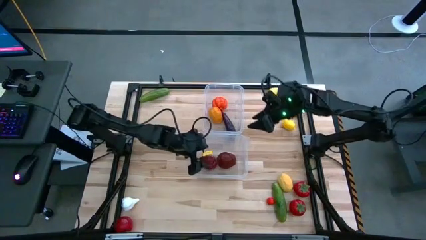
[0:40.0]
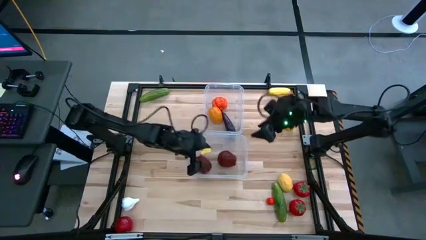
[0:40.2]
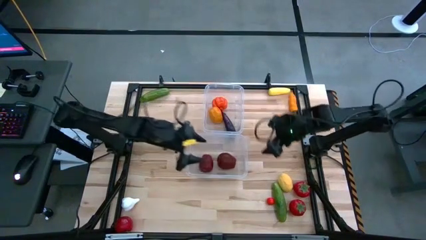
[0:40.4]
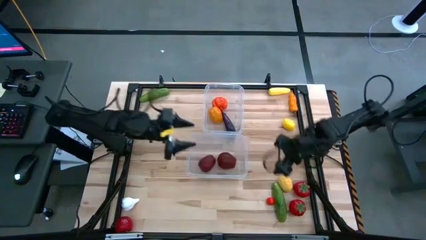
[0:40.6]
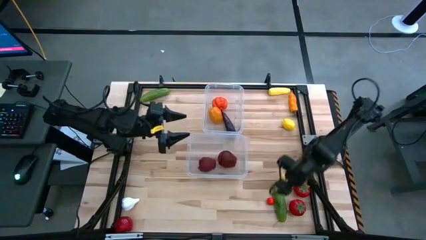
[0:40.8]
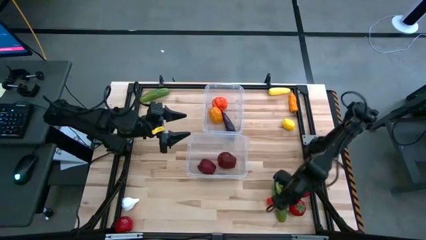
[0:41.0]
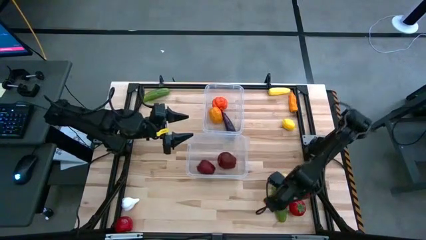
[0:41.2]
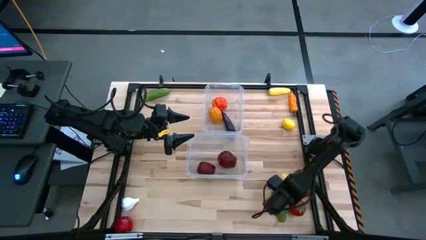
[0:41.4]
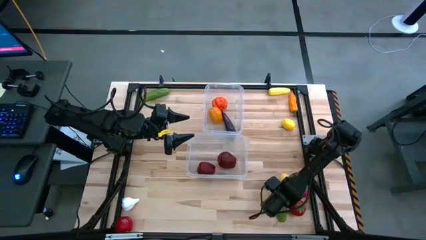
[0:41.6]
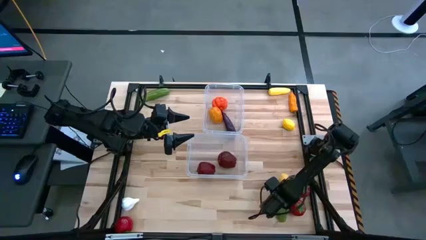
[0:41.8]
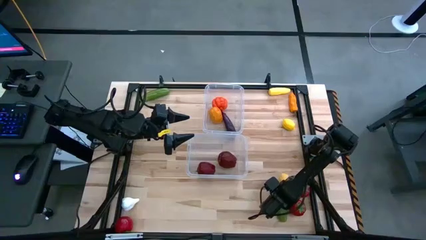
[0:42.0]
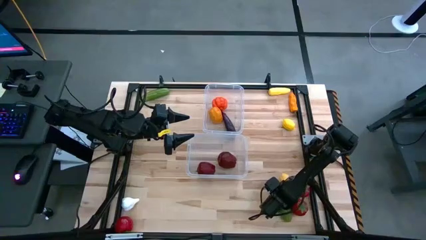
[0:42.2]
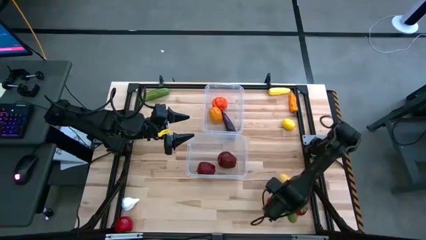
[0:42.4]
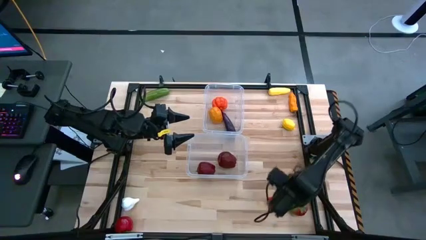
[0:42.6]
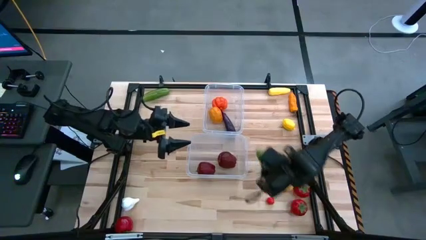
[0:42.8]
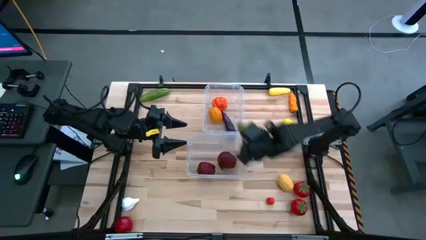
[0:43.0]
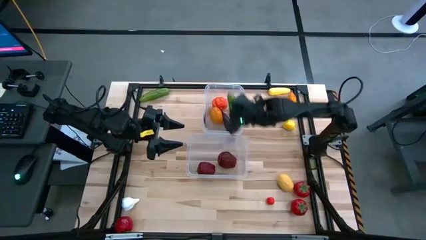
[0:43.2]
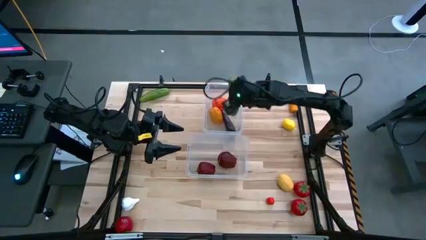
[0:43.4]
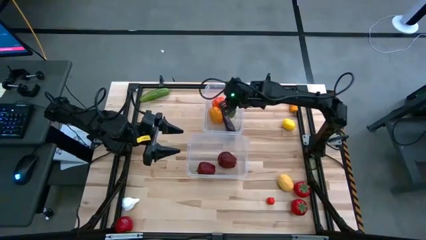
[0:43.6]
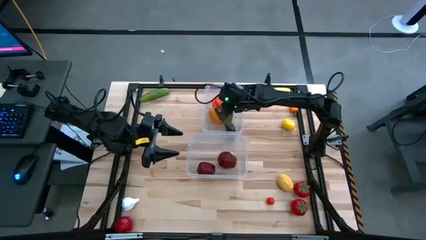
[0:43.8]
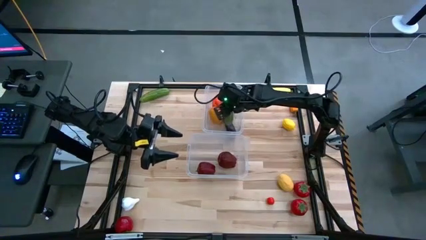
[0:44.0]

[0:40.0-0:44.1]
Task: Sort produce into baskets
Put the green cucumber into the top transparent bin

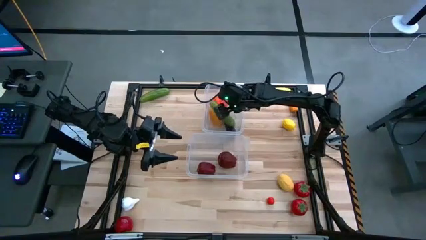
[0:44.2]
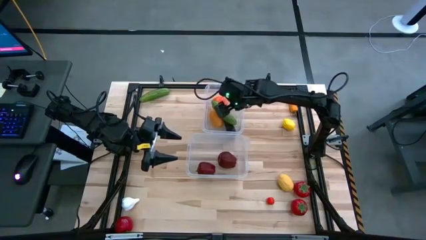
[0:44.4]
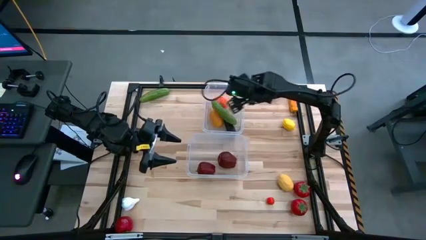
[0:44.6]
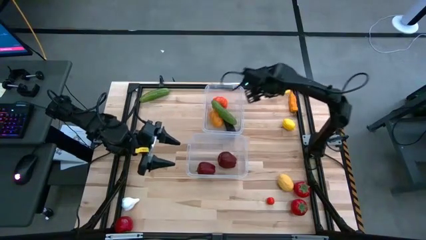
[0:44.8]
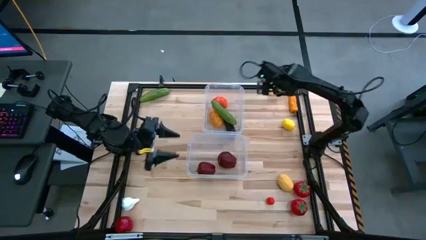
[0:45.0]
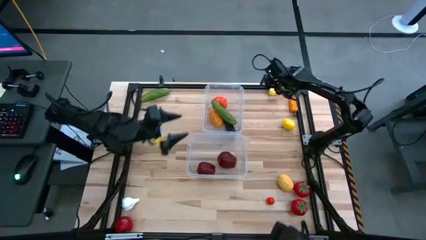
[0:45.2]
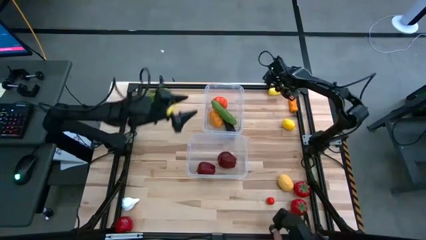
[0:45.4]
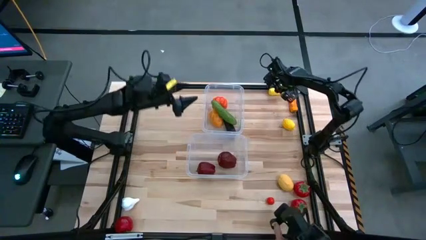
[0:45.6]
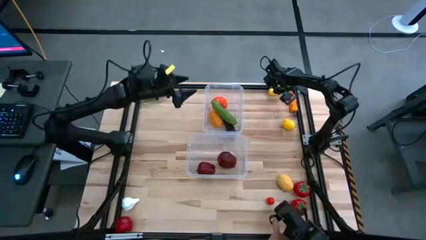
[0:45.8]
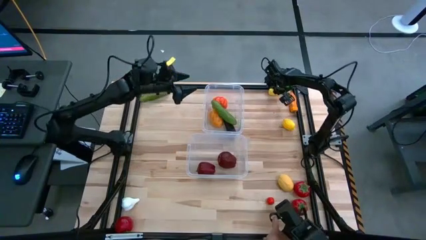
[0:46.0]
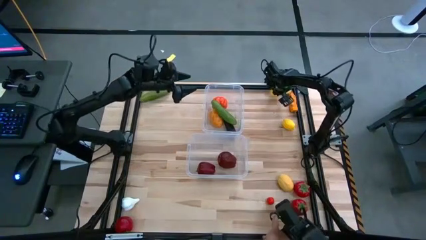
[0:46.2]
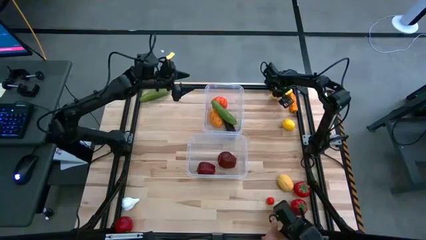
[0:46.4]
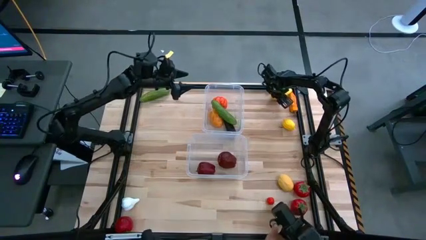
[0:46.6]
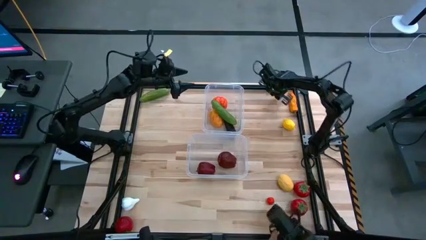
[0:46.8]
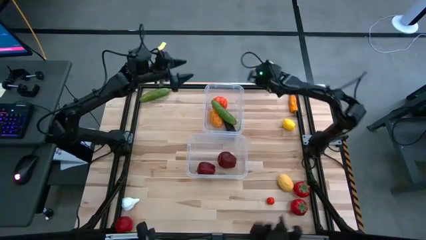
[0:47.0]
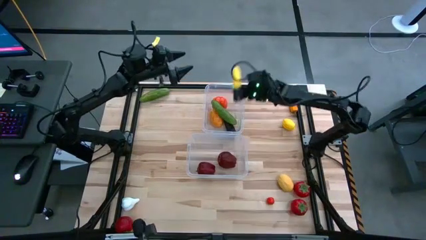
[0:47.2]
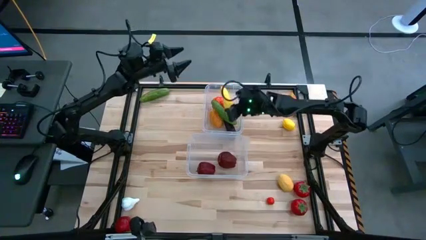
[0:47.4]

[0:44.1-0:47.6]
Put the yellow corn into the top transparent bin

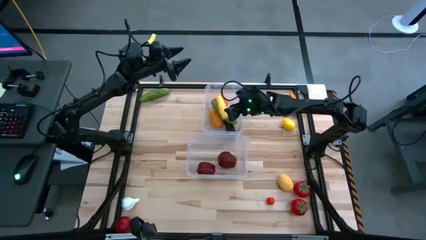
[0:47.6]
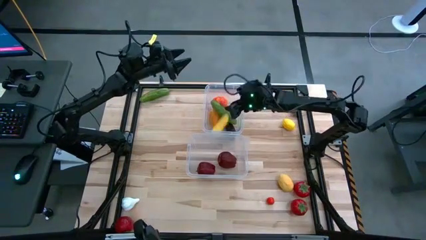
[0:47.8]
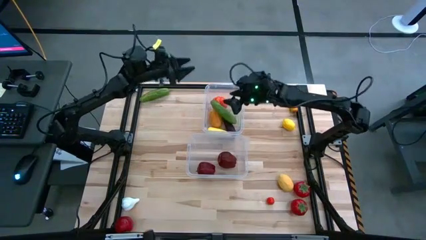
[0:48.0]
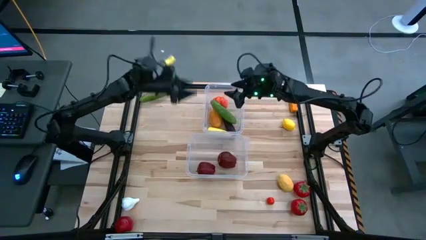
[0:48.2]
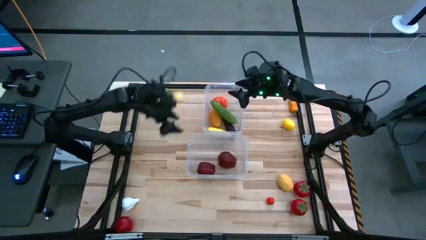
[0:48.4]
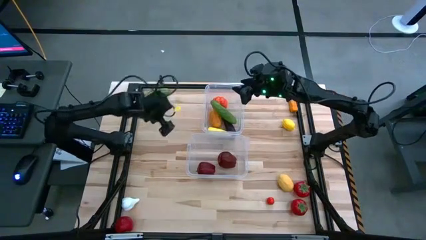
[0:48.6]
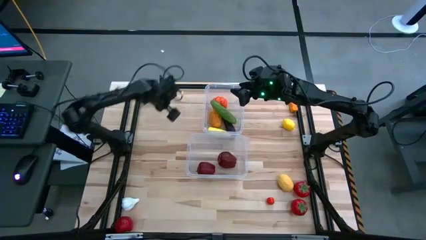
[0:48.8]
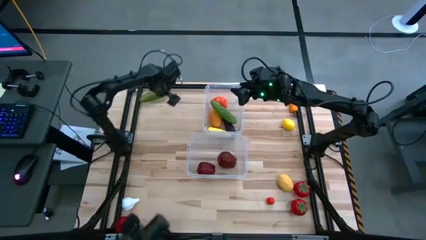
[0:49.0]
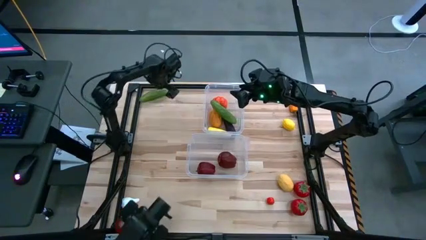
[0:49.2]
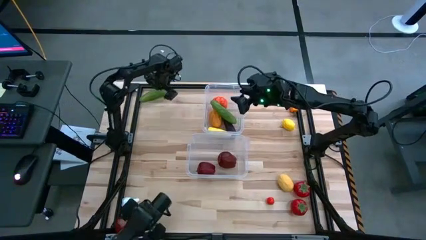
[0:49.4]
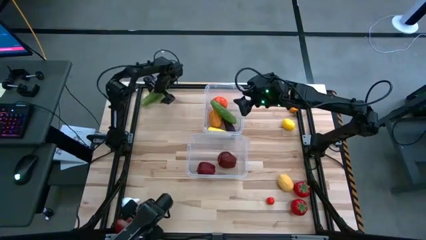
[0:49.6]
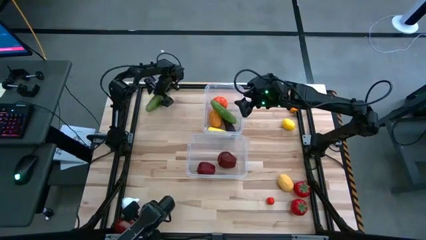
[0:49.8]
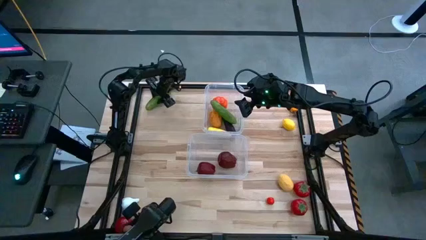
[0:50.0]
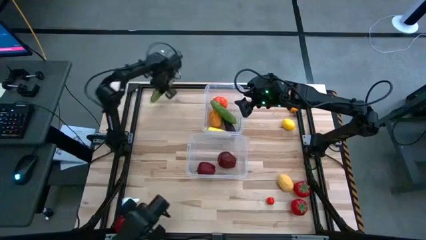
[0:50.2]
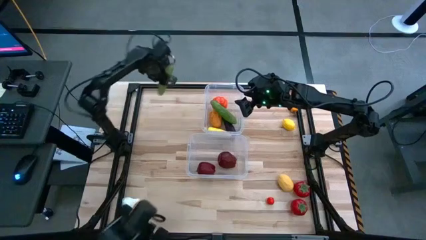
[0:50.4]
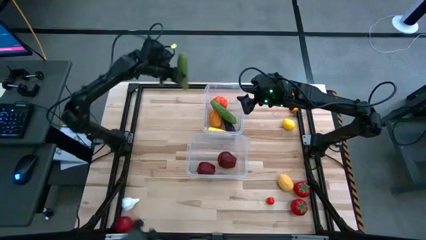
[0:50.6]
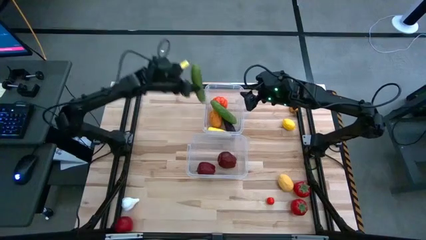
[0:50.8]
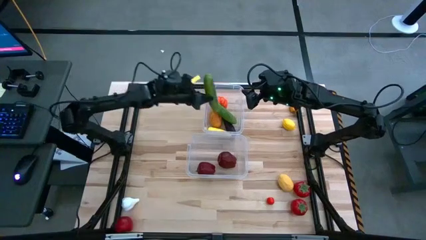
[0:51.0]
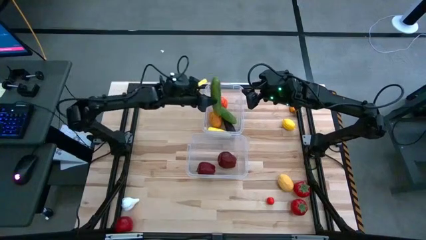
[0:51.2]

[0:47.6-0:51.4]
Put the green cucumber into the top transparent bin

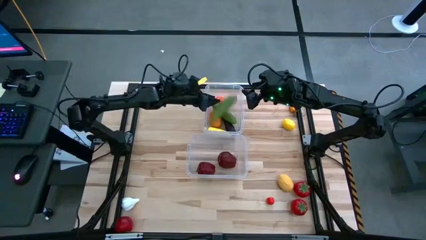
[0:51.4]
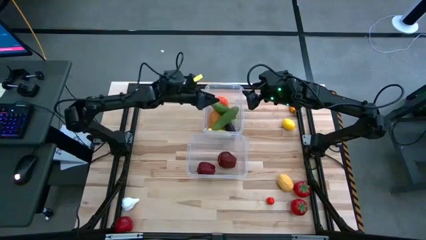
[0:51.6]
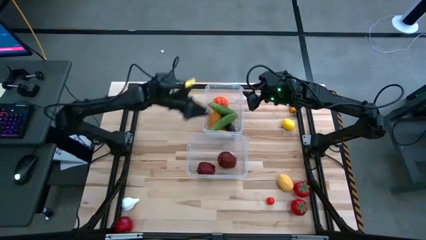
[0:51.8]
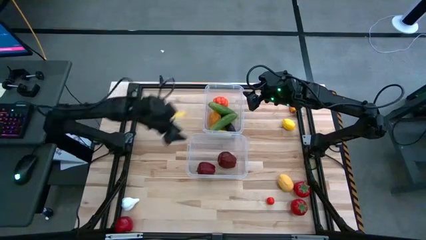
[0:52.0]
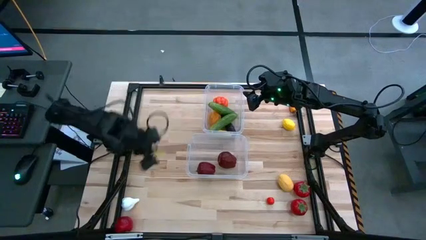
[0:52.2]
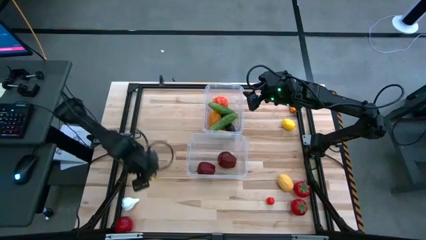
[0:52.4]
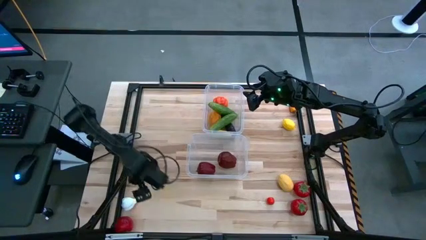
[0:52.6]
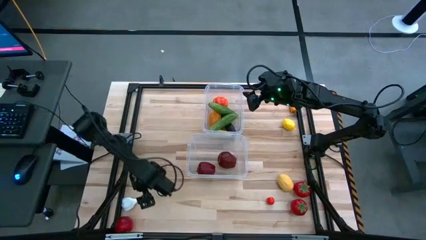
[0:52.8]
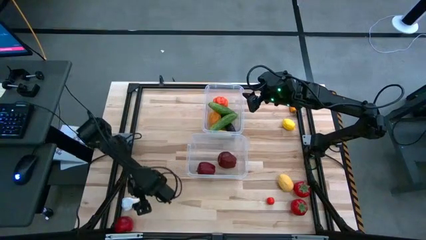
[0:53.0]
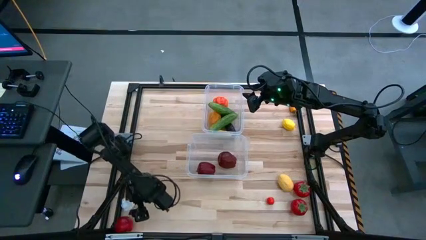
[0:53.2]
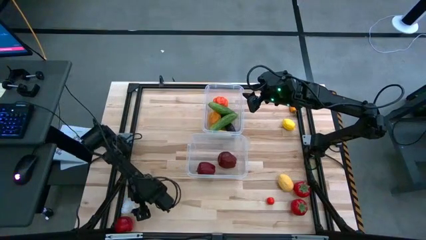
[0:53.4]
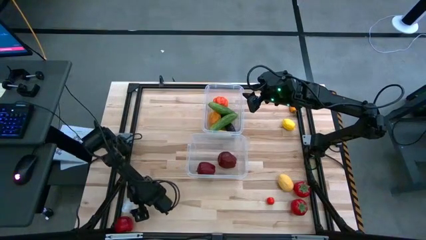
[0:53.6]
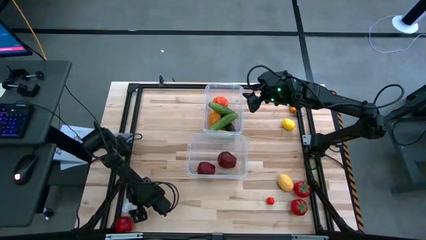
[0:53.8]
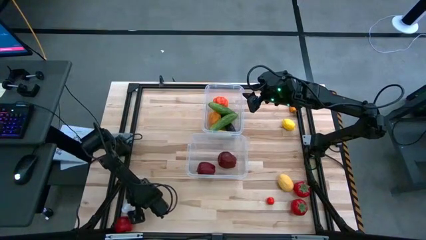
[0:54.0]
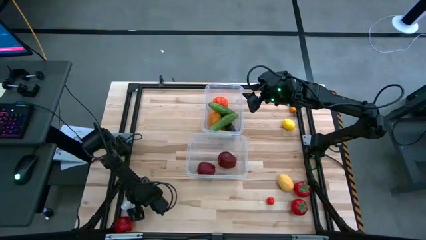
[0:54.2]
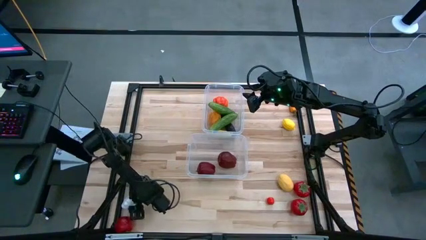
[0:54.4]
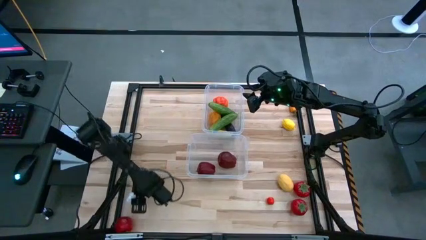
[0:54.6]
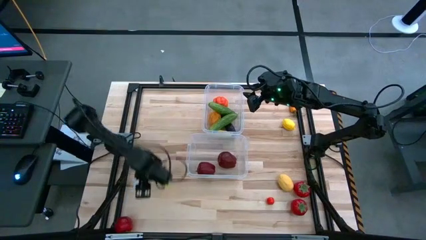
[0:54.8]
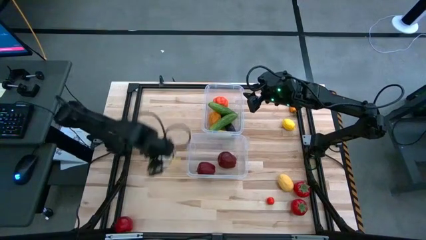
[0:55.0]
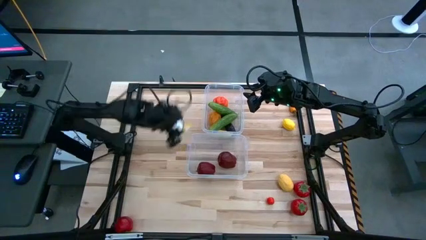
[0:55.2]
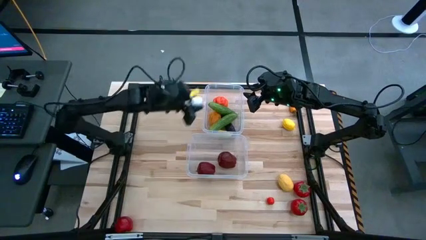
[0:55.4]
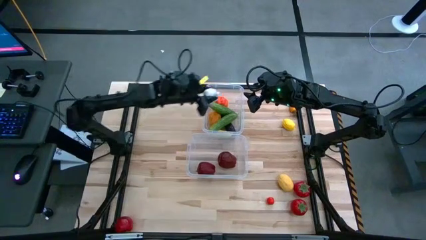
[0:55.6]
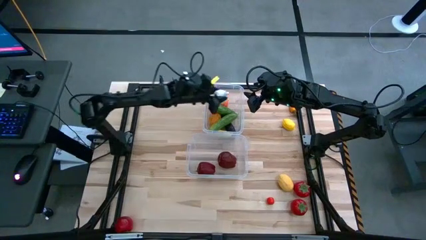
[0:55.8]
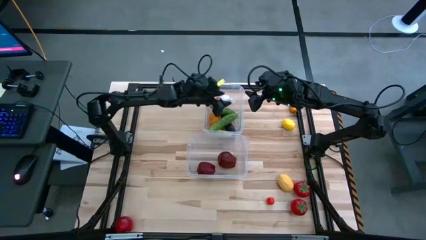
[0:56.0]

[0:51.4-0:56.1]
Put the white garlic into the top transparent bin
